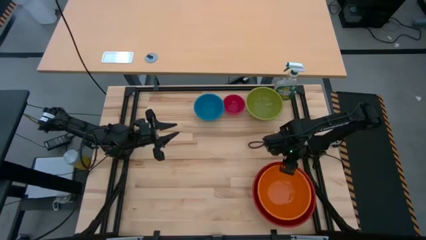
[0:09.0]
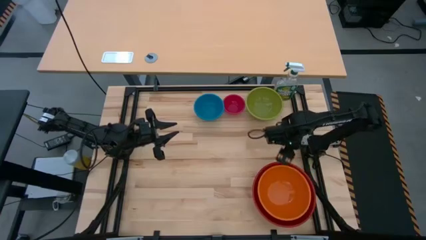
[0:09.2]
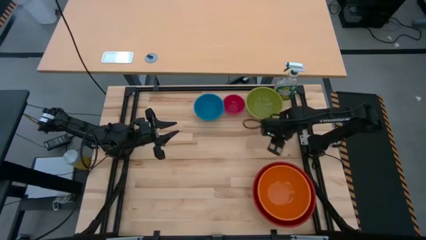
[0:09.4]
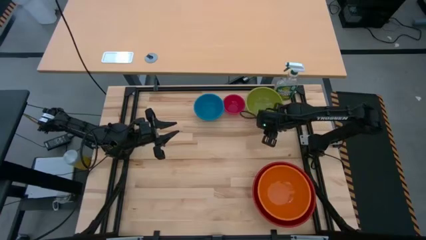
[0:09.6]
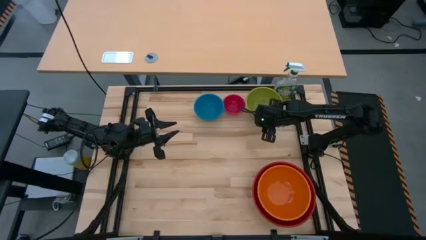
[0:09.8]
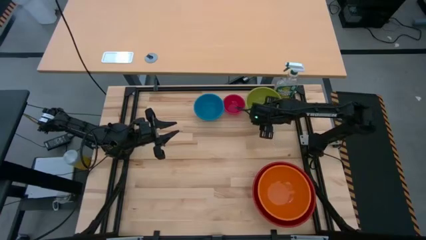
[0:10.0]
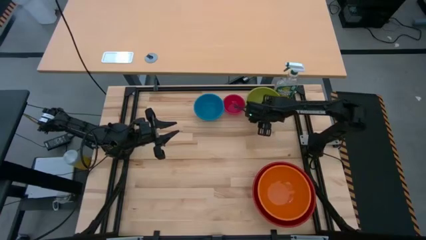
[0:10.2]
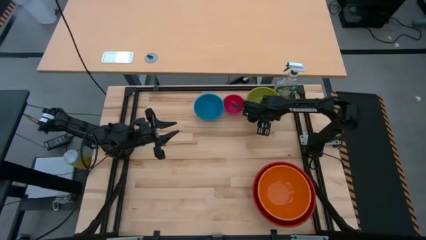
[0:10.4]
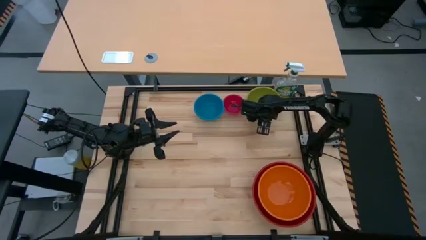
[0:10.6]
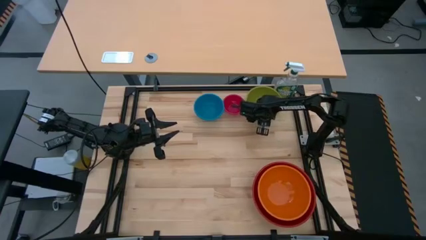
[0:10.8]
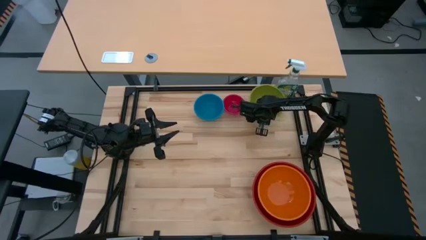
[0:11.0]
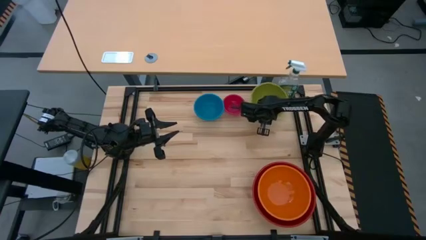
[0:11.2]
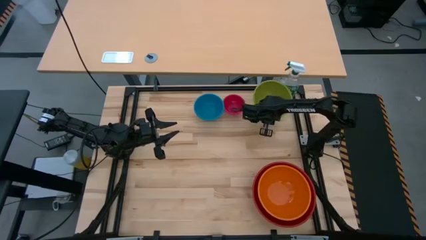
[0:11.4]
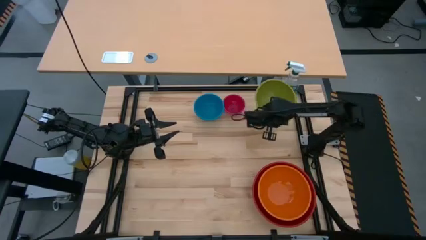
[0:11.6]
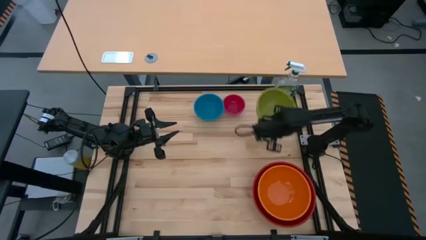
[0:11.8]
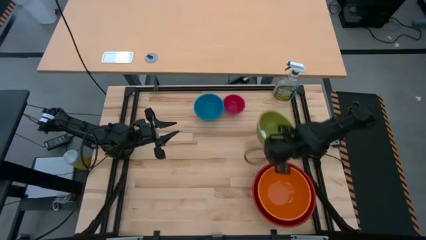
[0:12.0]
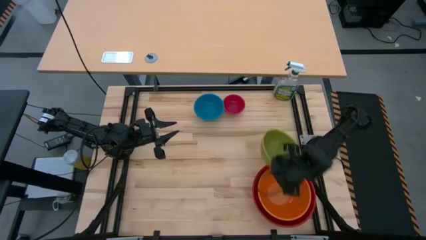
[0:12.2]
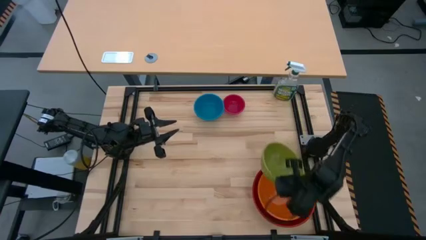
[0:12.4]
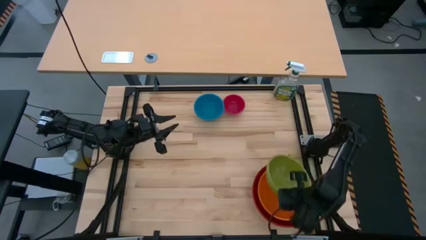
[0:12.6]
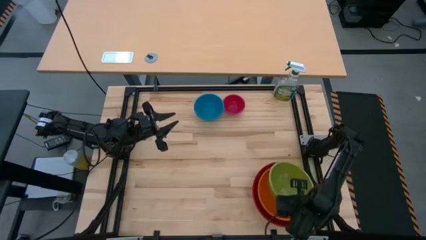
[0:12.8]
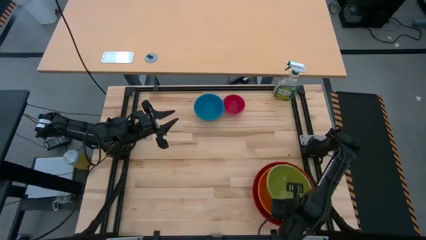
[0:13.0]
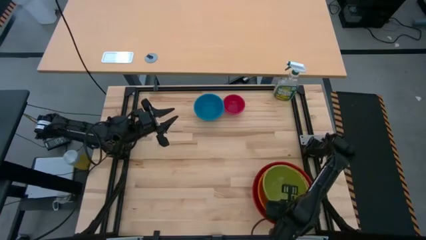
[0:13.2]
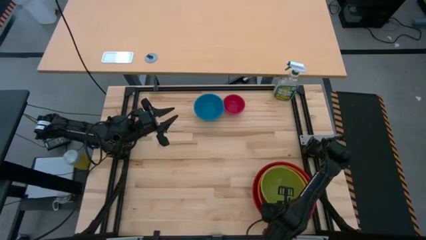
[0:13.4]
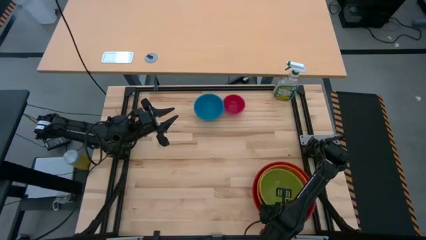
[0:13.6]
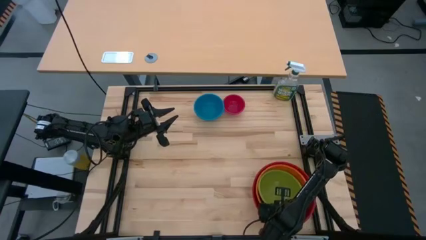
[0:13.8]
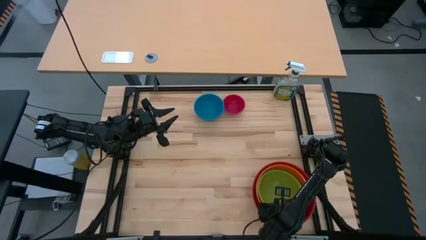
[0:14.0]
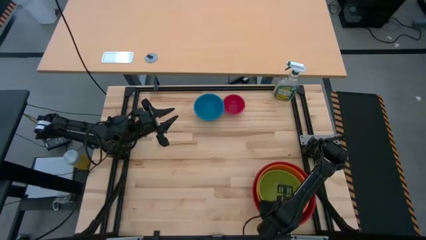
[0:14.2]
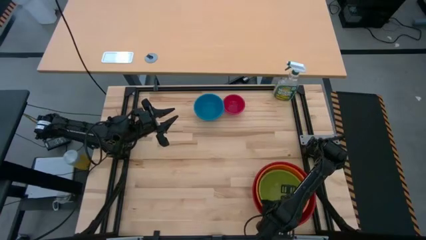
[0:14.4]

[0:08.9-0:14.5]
Stack the green bowl on top of the orange bowl

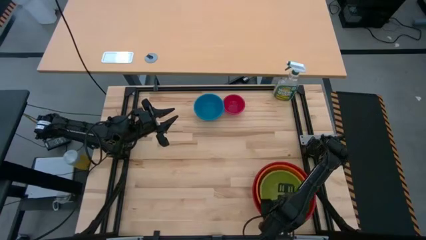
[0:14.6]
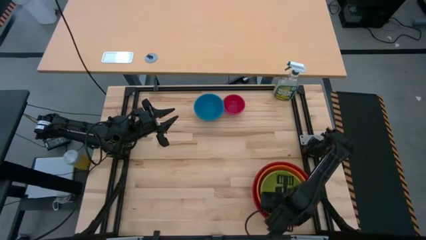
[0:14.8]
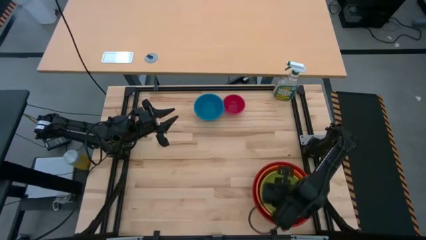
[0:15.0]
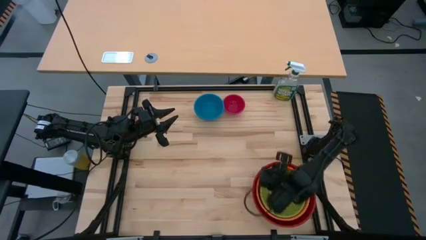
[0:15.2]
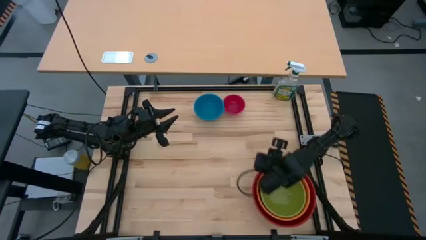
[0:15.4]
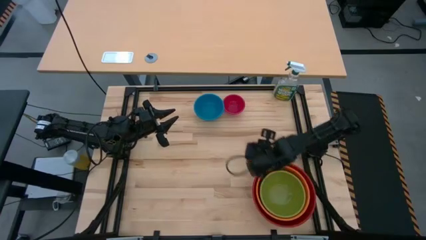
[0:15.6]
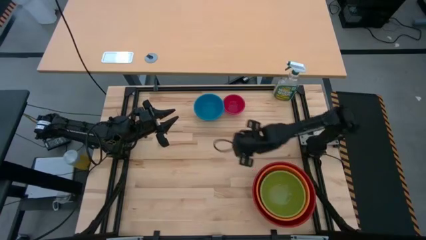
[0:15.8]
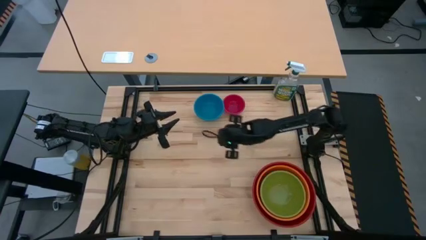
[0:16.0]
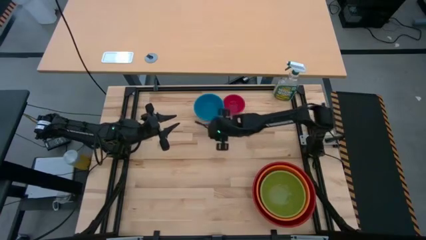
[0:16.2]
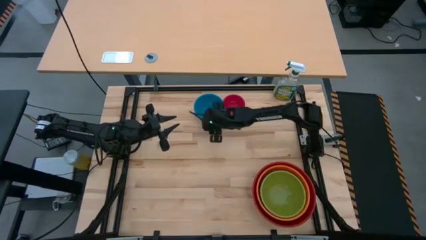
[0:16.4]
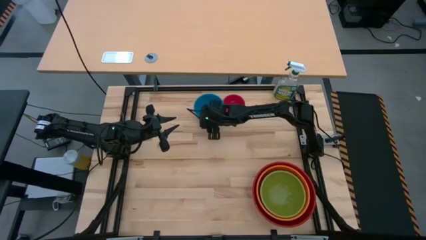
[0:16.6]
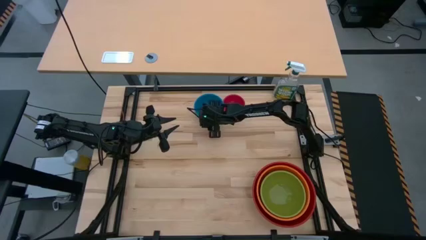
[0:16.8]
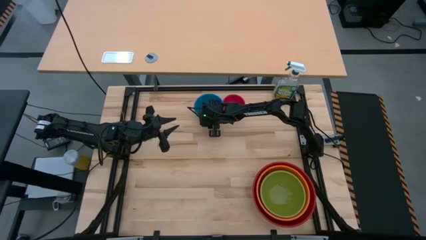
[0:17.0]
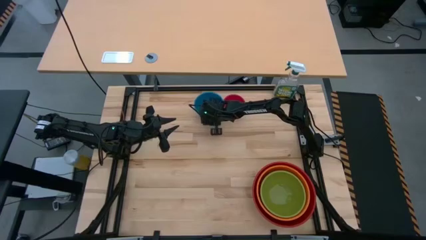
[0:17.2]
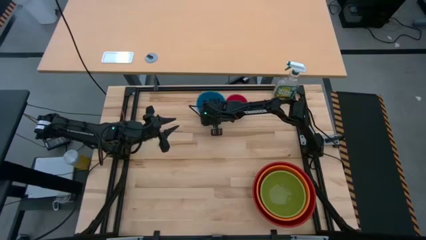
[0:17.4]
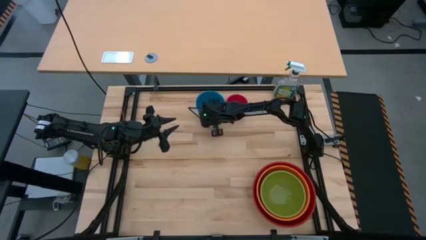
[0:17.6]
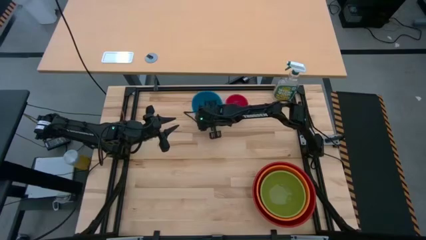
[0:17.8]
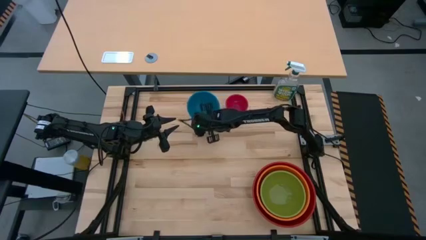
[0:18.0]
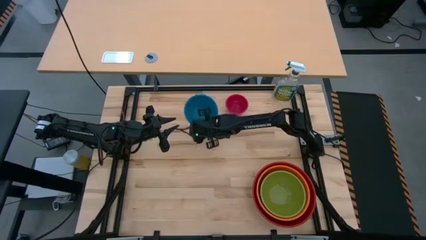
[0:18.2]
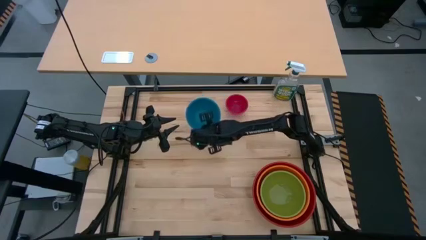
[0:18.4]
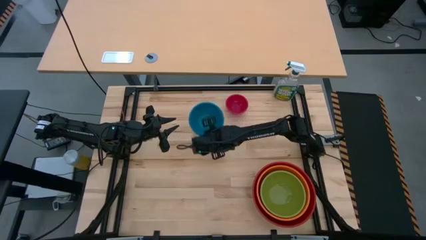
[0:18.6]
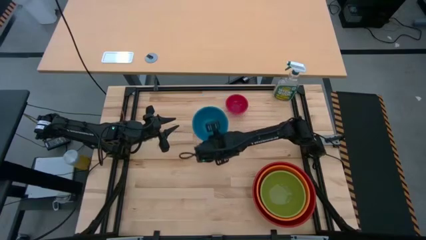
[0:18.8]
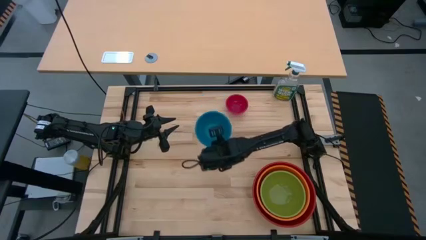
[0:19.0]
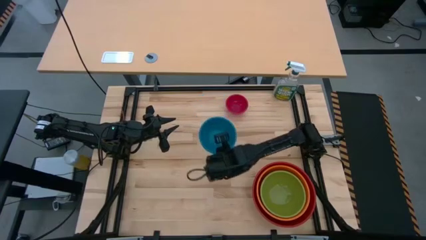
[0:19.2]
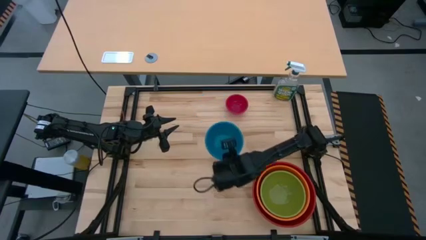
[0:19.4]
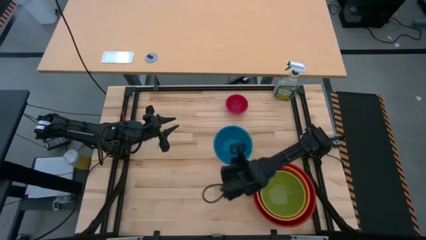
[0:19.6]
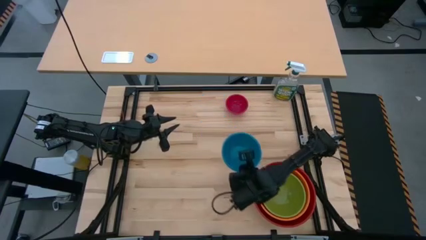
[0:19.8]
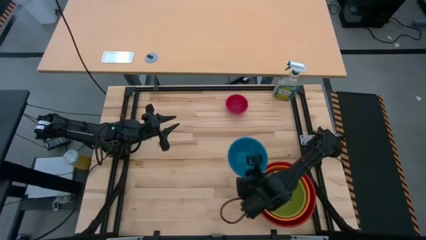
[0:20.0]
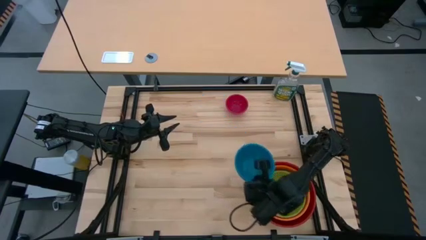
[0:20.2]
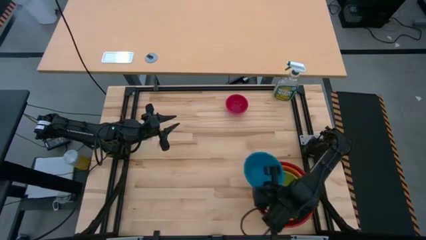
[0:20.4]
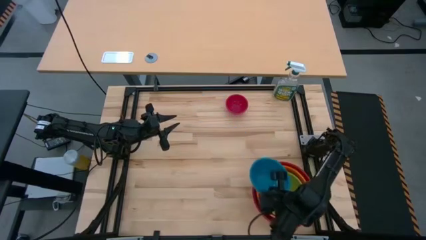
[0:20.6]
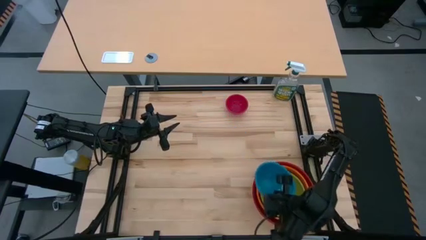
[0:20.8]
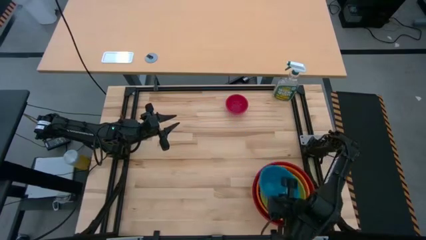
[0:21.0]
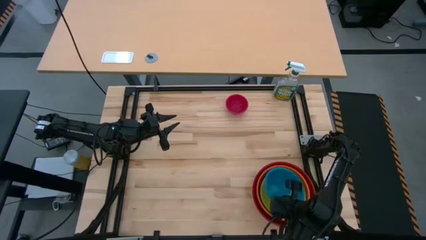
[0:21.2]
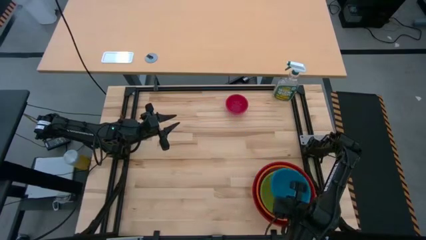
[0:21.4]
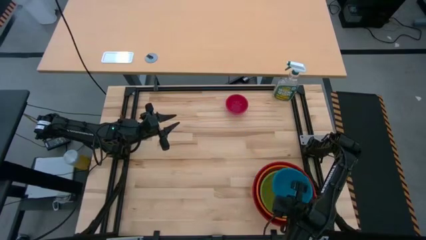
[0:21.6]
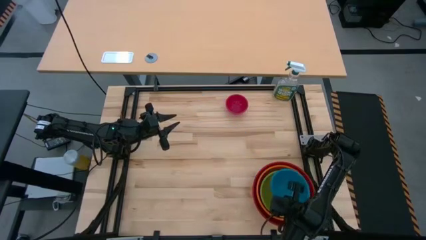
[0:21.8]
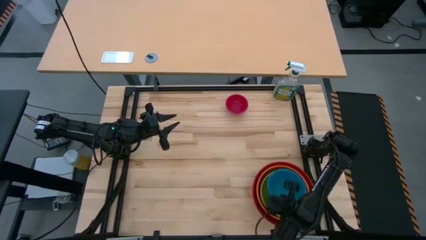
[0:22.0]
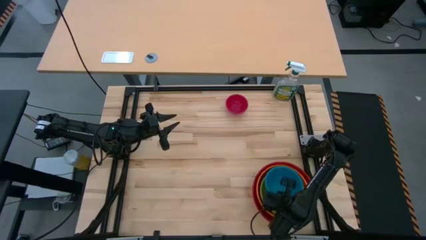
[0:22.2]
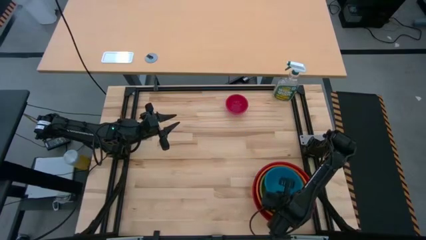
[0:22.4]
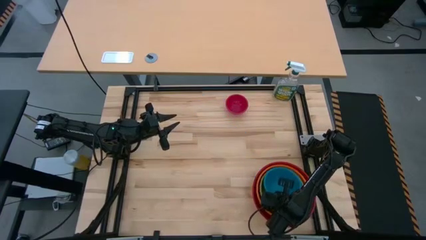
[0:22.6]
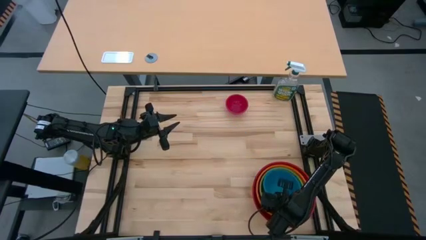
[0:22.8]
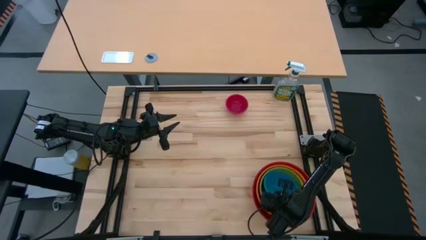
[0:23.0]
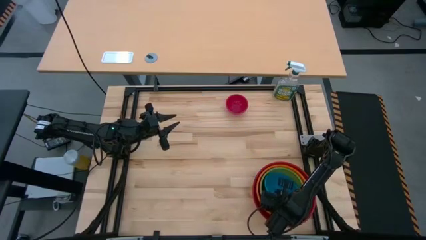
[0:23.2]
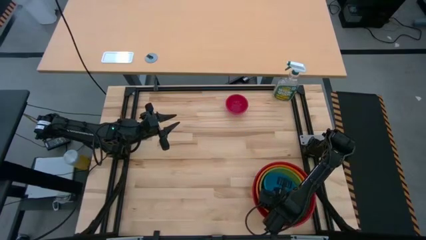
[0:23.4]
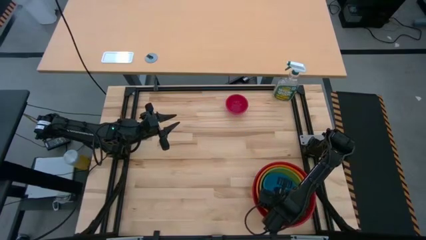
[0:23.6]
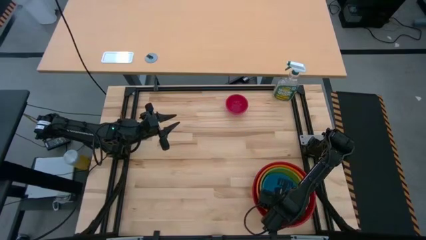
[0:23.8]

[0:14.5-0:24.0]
Stack the blue bowl on top of the green bowl
